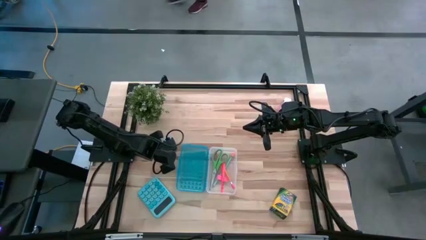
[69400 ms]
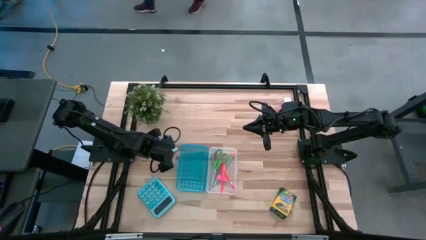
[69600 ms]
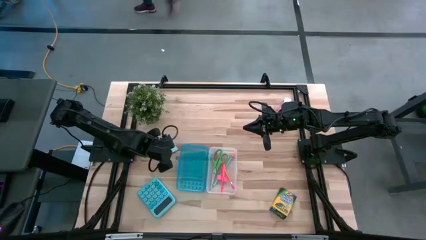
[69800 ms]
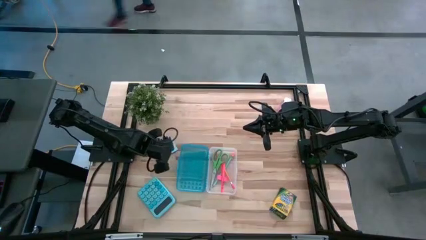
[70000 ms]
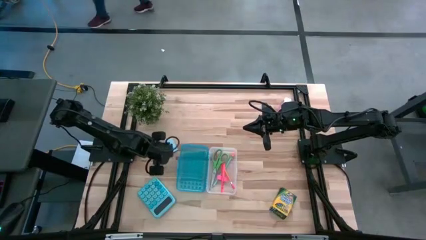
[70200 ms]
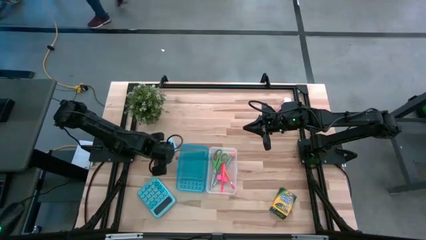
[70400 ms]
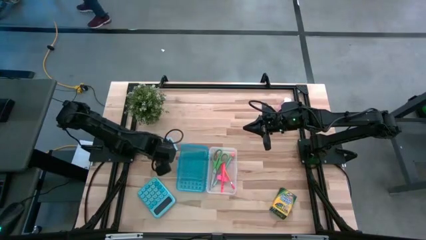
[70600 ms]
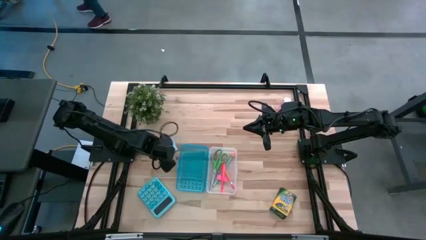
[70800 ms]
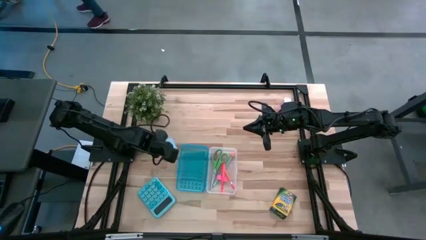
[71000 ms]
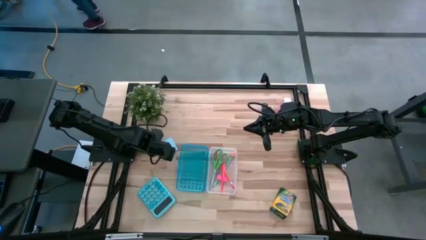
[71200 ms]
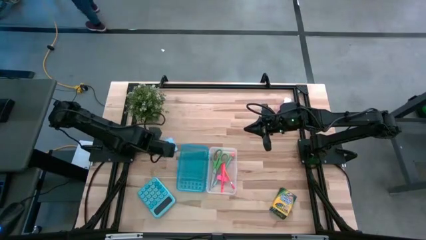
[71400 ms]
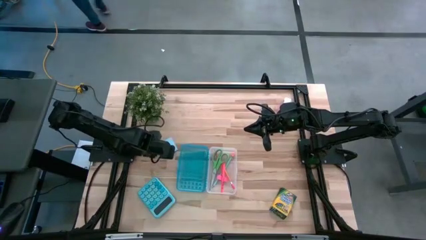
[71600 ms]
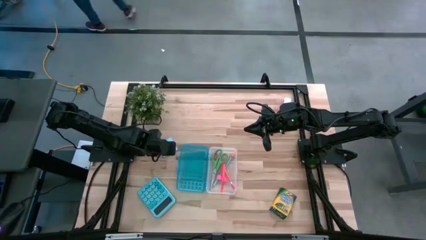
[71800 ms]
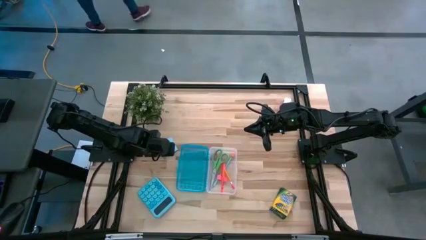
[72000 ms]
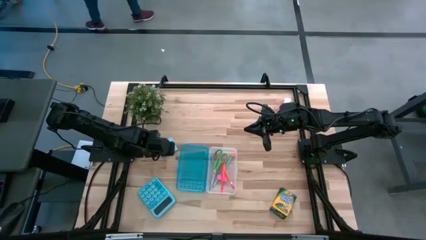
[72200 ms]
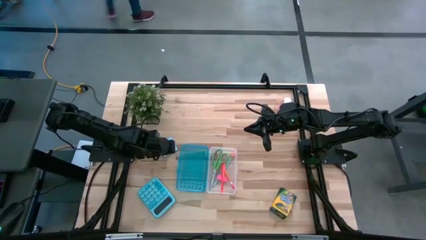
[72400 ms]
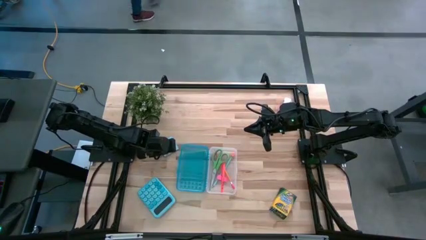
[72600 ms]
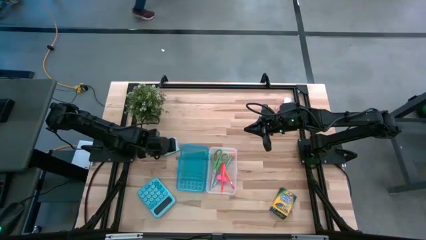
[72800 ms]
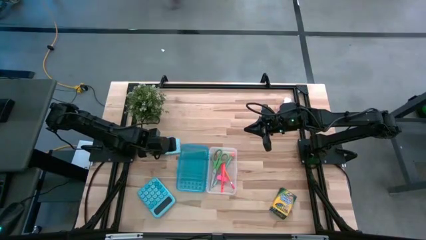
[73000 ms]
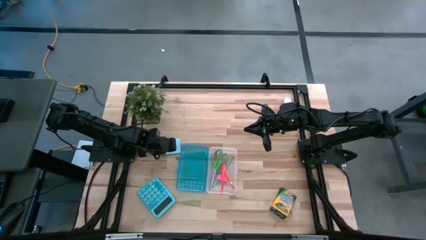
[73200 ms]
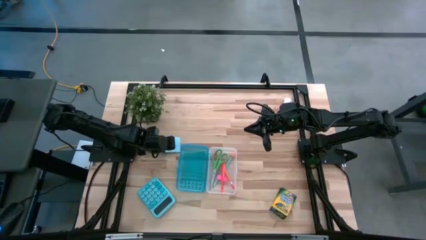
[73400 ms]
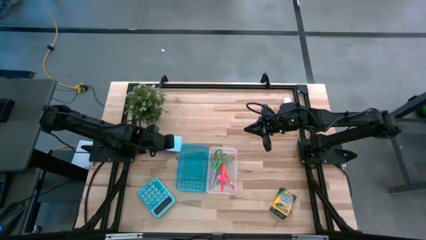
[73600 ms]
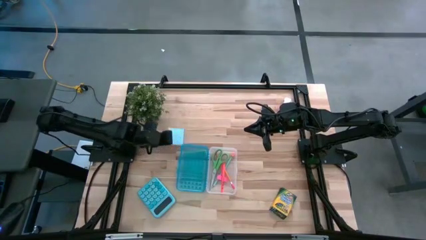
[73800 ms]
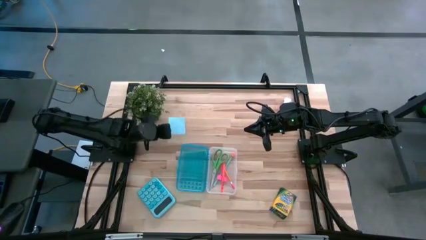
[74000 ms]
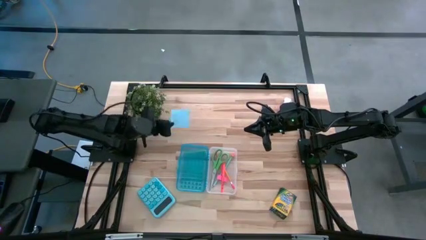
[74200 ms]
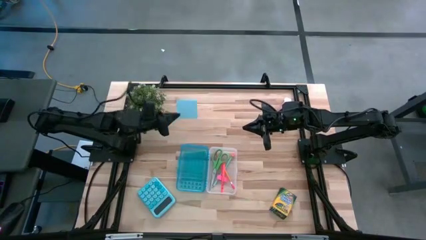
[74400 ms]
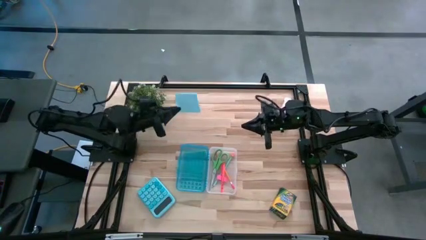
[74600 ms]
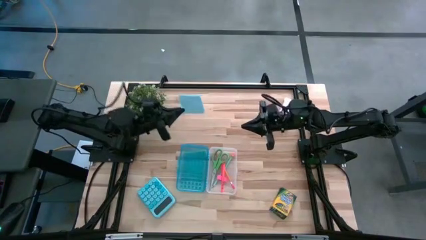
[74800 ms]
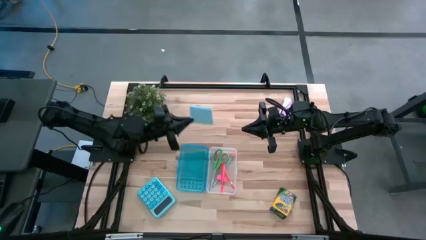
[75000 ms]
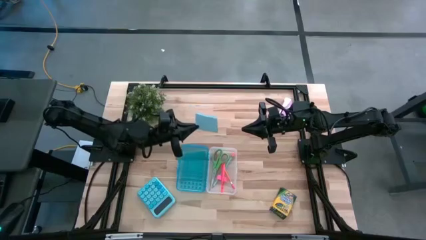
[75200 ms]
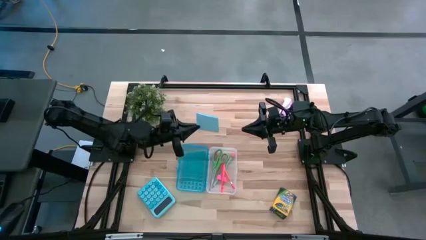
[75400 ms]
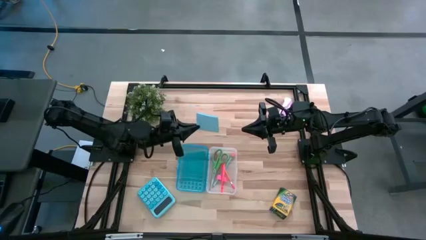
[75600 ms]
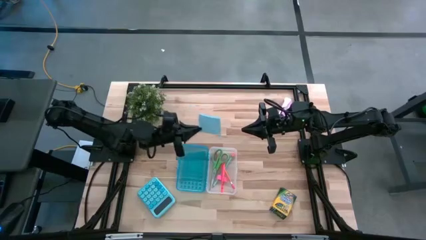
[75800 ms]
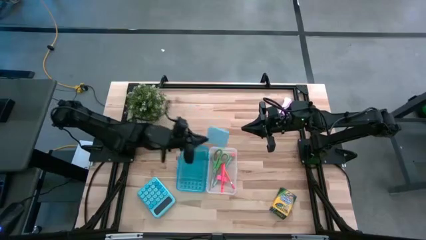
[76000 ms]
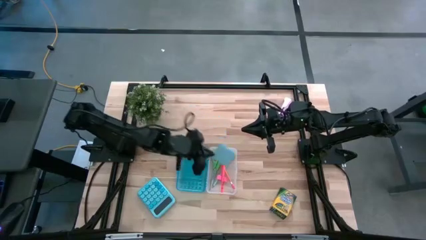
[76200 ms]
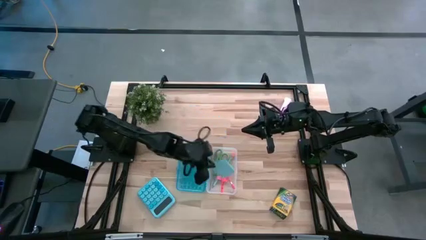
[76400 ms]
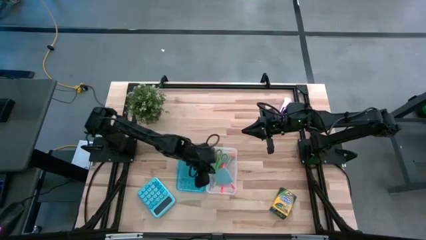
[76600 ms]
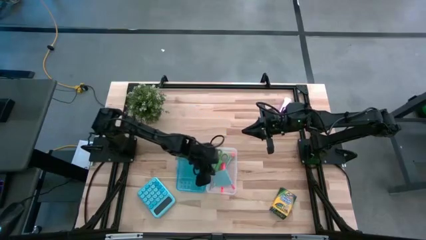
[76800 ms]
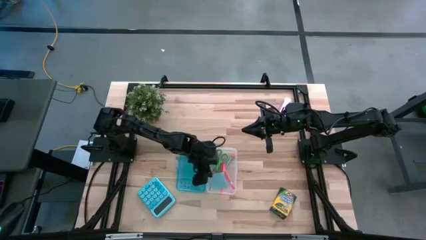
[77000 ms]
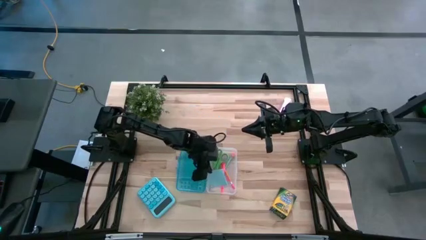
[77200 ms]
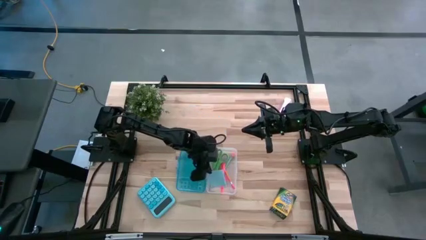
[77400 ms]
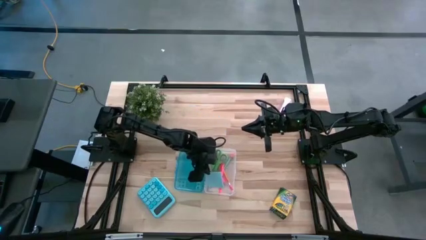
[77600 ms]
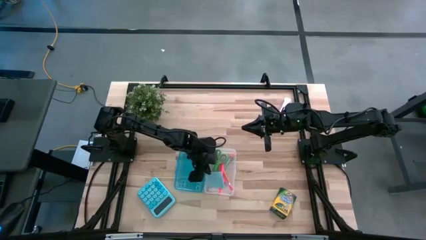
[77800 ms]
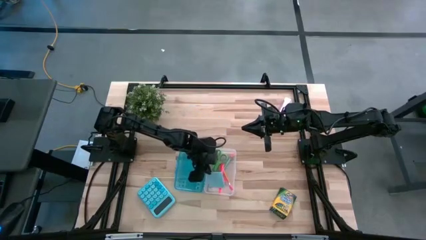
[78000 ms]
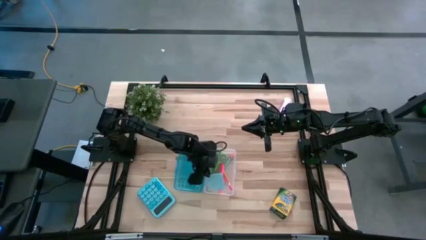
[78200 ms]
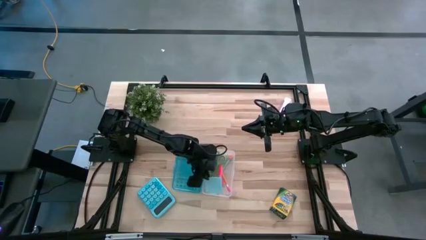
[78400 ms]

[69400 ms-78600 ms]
Task: Pack school essentials
Put the blue sticky notes into the blue supply box

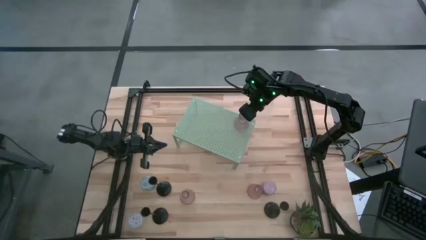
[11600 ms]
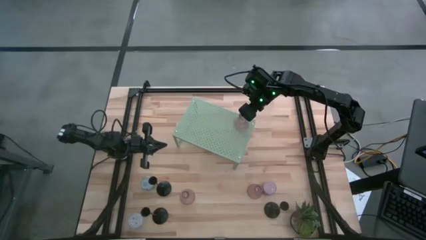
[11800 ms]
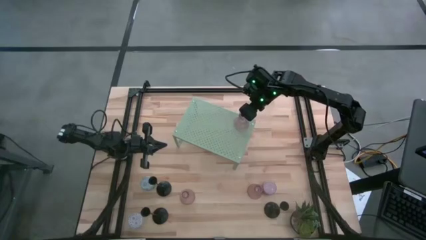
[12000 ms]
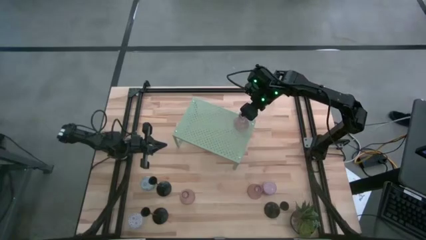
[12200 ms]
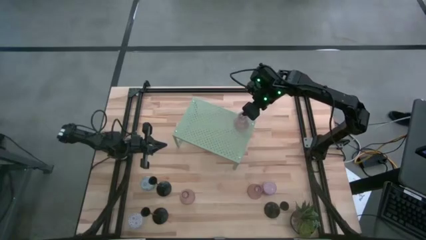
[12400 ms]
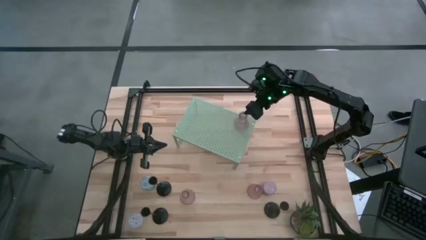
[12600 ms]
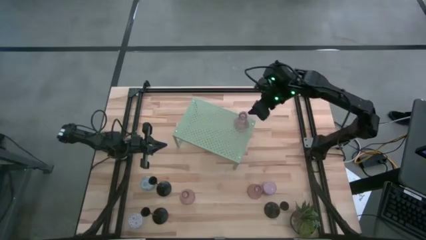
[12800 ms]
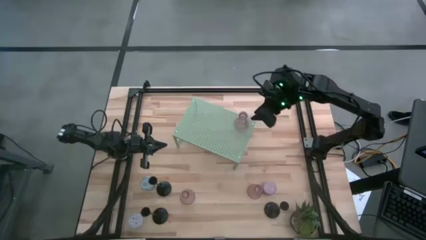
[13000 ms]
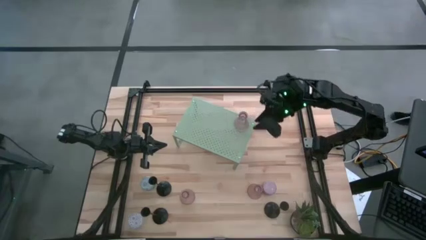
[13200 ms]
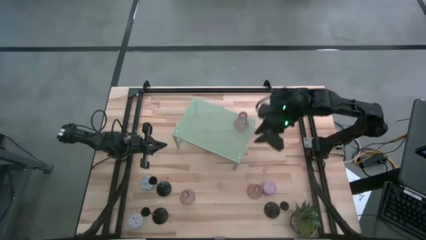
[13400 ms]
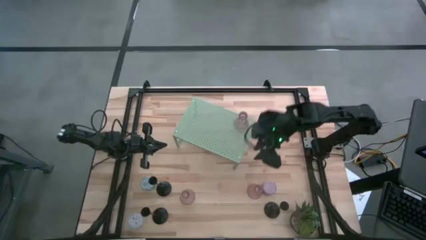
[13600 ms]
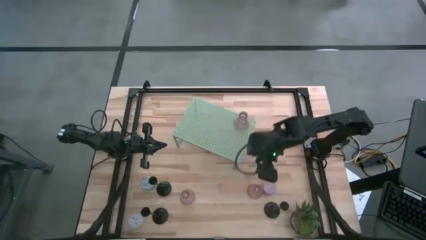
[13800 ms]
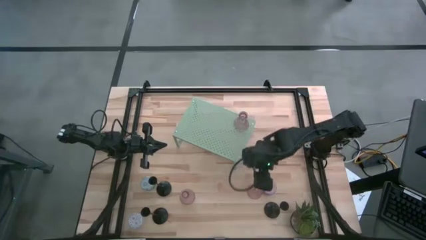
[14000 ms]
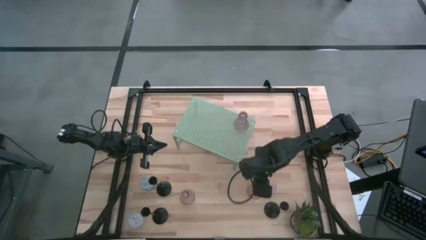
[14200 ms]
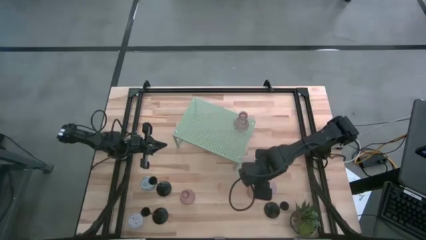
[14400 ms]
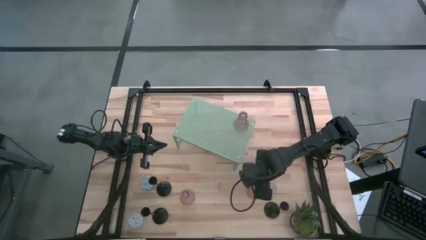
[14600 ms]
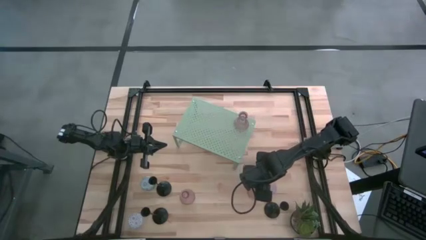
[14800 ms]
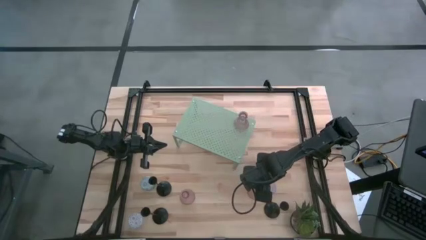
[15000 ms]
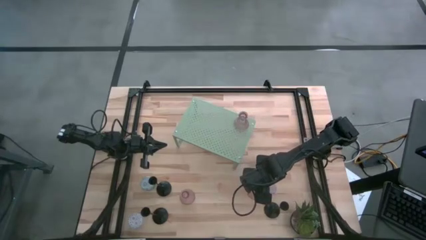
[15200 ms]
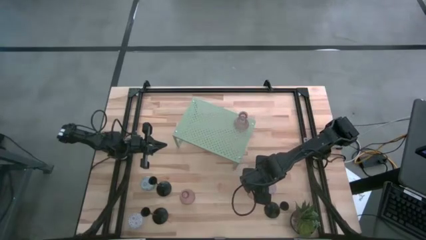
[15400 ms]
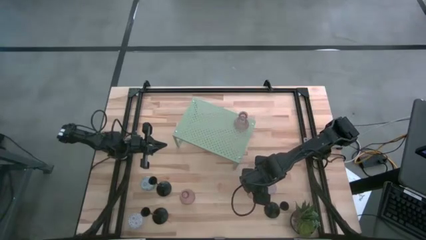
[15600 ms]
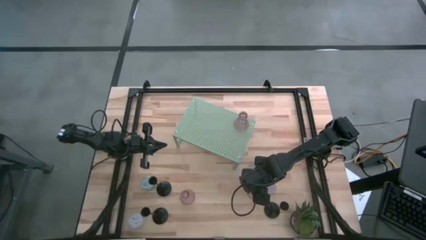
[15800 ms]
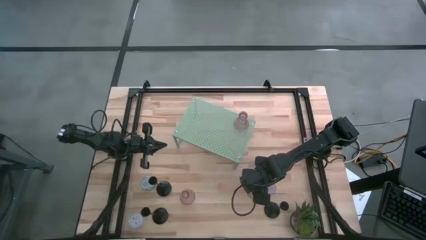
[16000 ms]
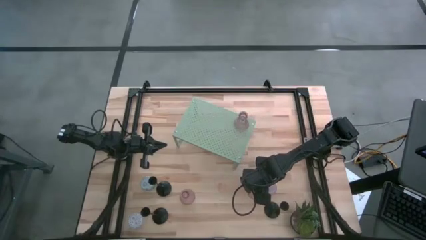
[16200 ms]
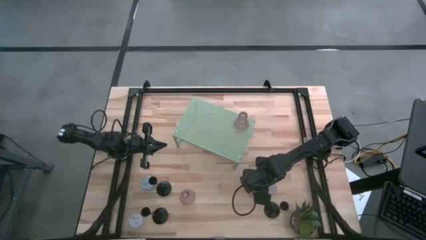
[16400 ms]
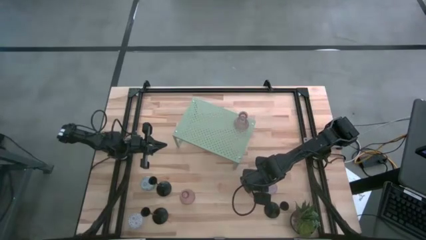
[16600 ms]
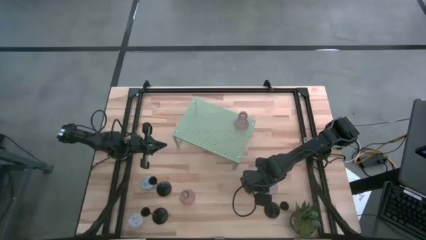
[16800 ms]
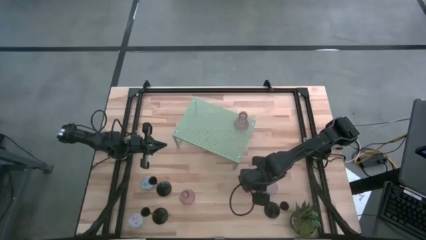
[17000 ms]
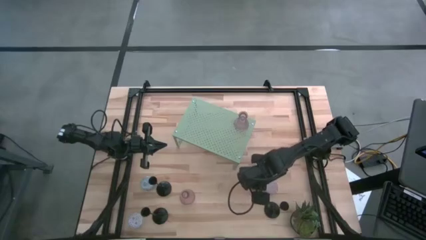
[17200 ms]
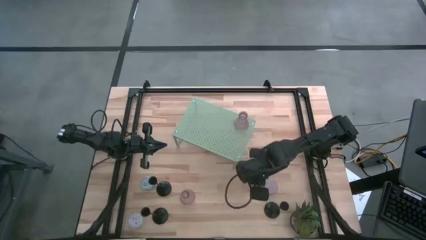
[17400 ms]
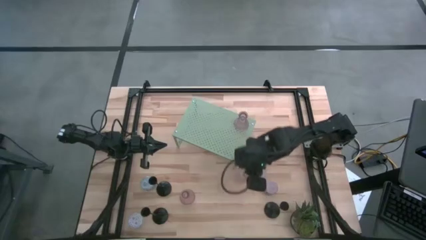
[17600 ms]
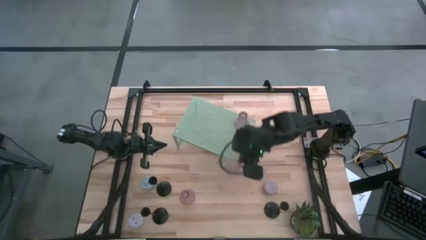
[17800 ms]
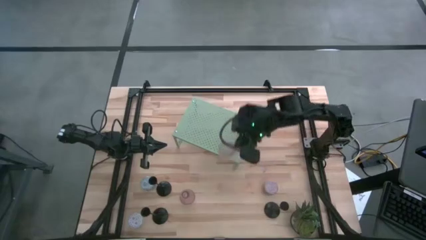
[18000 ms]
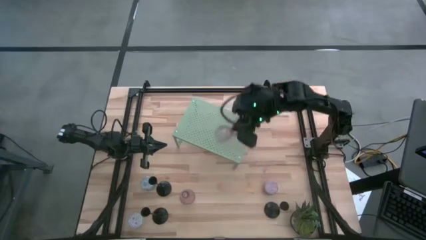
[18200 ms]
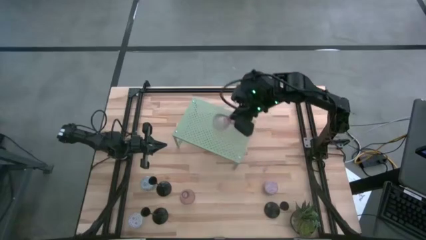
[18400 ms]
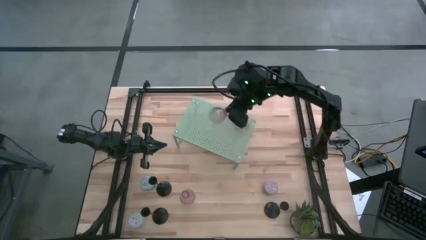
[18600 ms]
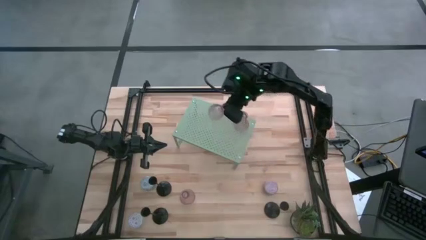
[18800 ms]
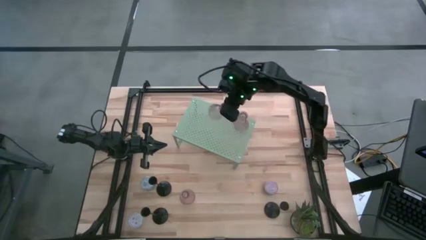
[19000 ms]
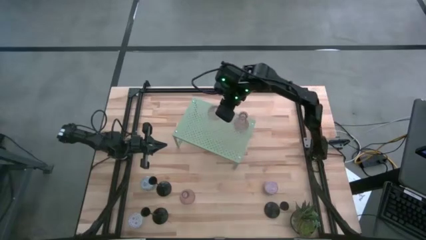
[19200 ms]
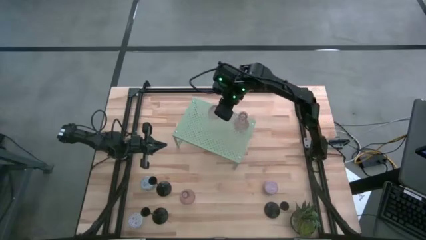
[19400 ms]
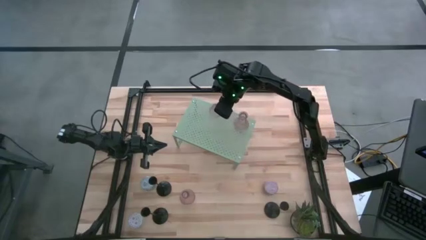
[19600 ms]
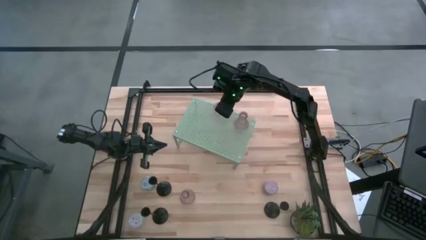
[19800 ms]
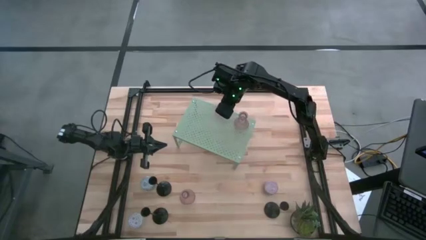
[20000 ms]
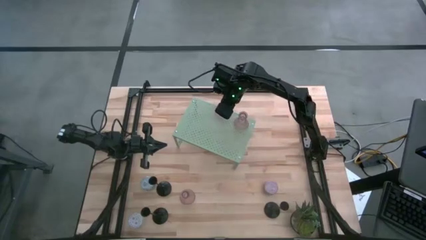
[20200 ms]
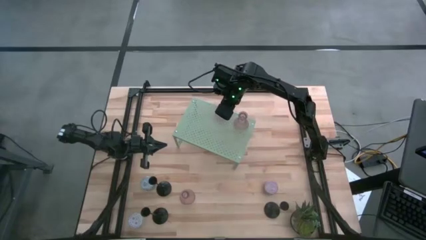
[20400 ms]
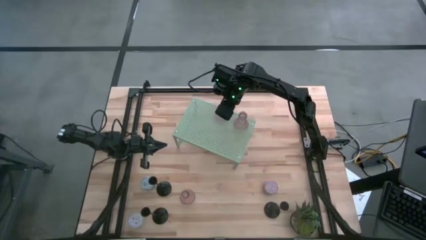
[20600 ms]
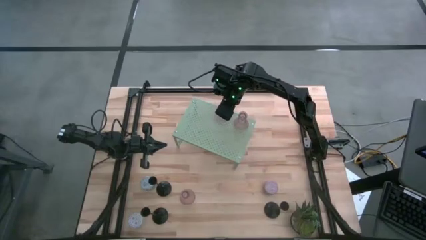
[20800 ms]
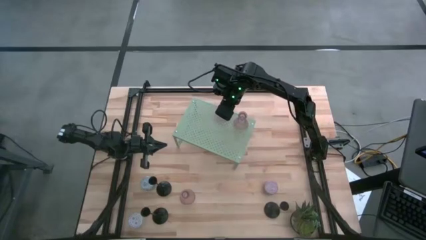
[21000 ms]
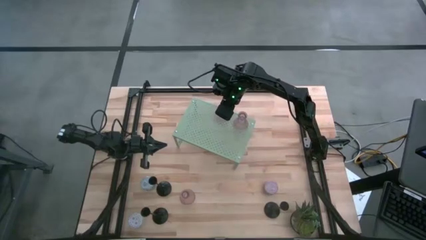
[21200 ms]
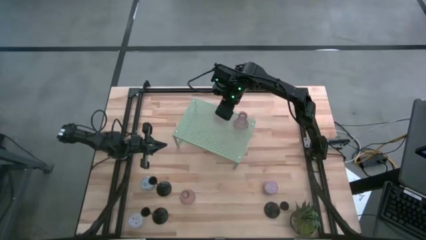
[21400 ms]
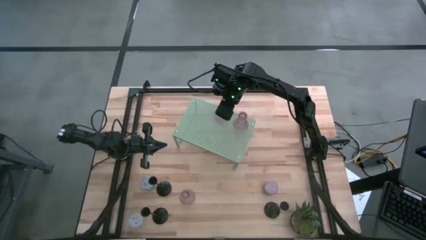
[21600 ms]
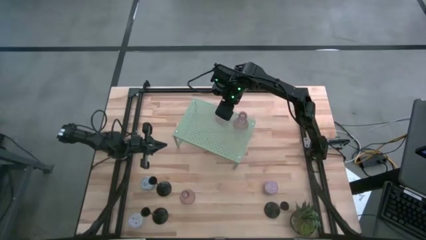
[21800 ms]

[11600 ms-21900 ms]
Task: Pick & Place candle stick holders
Put the right purple candle holder on the shelf aligned with the other purple candle holder
